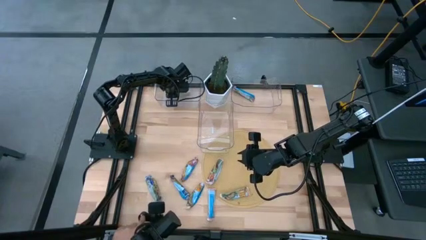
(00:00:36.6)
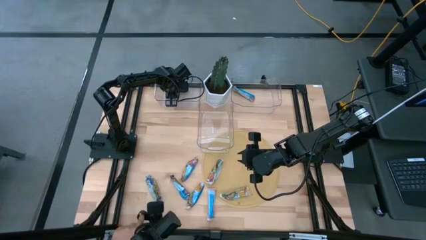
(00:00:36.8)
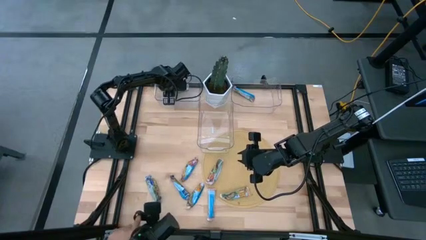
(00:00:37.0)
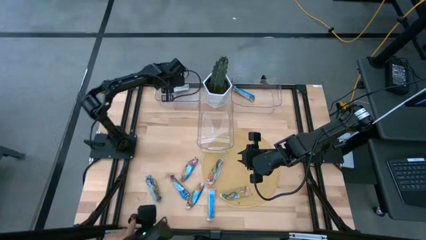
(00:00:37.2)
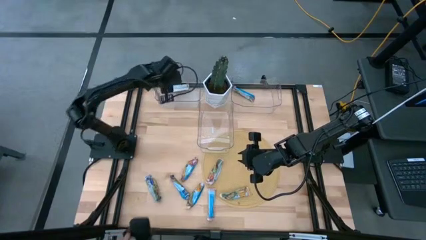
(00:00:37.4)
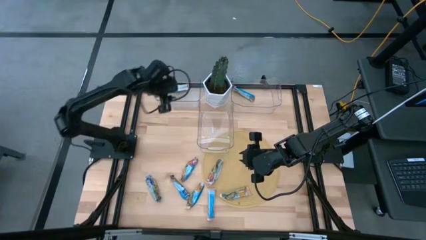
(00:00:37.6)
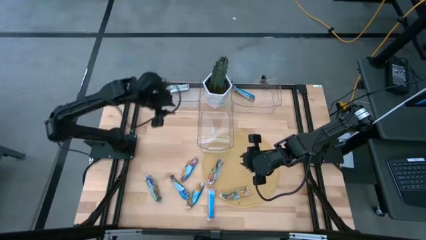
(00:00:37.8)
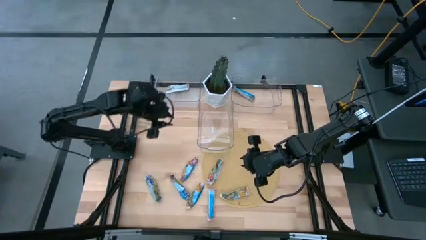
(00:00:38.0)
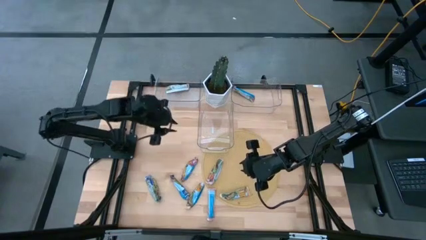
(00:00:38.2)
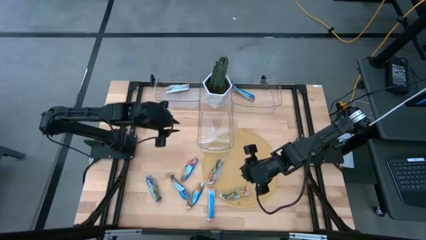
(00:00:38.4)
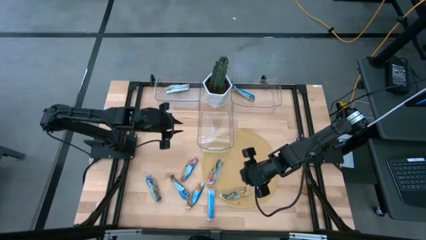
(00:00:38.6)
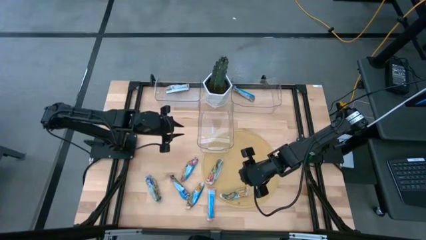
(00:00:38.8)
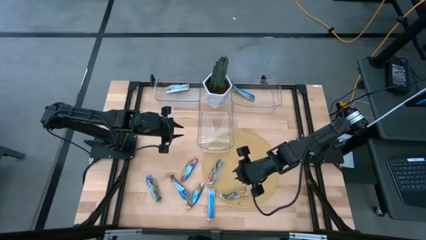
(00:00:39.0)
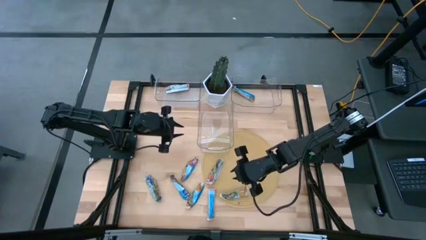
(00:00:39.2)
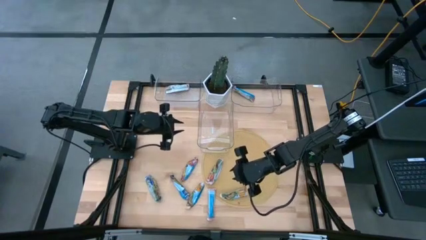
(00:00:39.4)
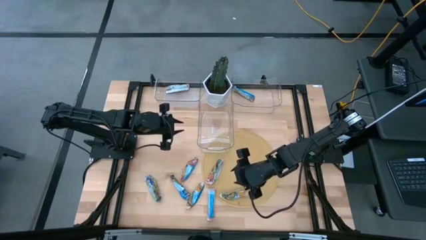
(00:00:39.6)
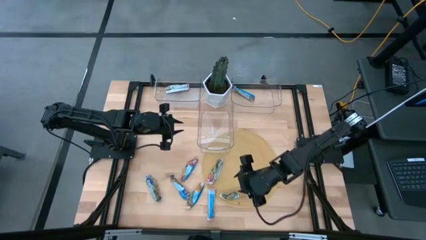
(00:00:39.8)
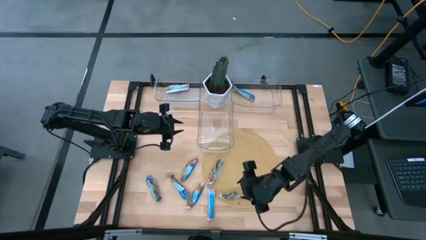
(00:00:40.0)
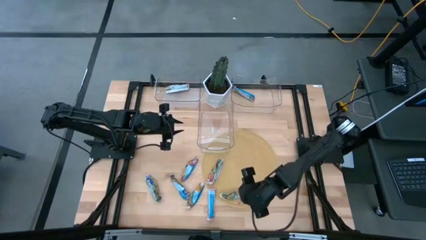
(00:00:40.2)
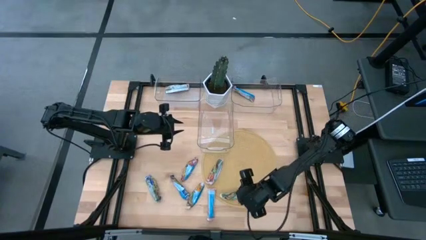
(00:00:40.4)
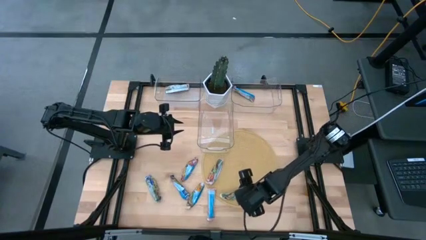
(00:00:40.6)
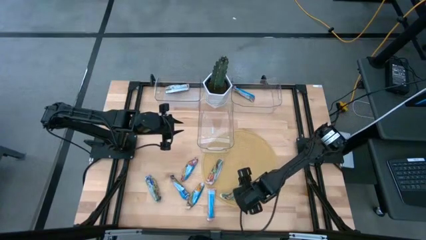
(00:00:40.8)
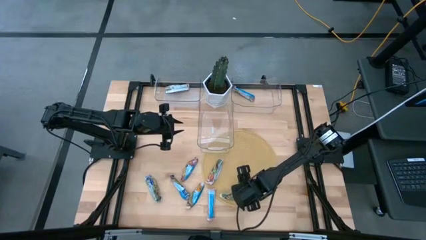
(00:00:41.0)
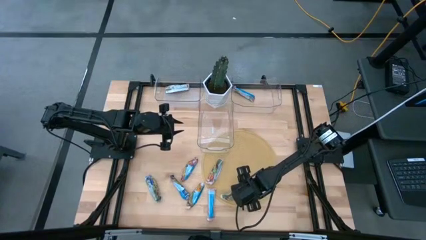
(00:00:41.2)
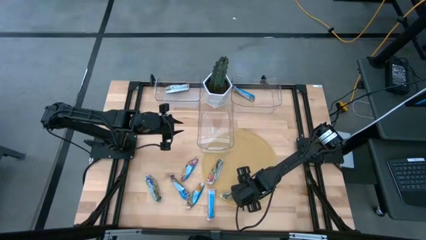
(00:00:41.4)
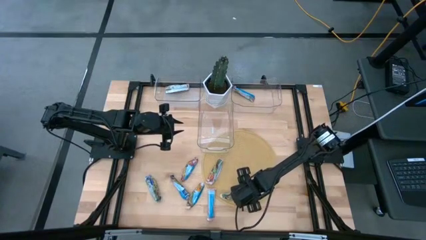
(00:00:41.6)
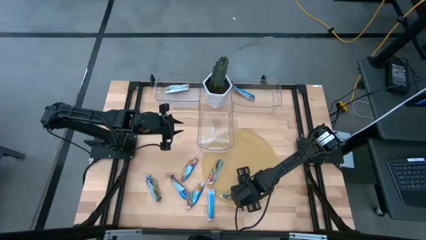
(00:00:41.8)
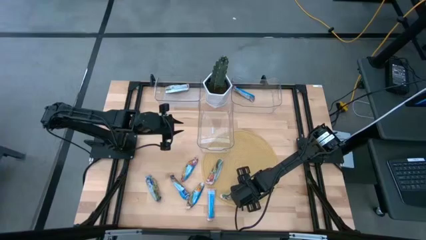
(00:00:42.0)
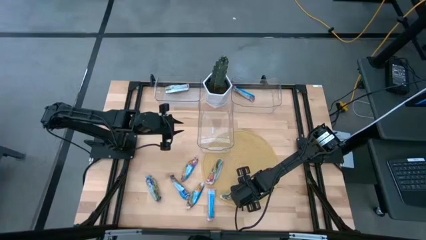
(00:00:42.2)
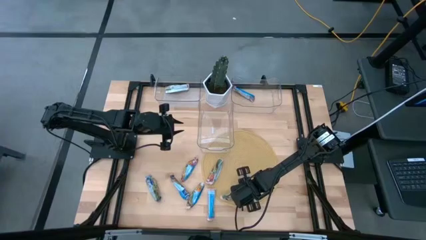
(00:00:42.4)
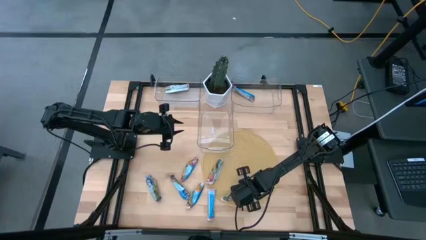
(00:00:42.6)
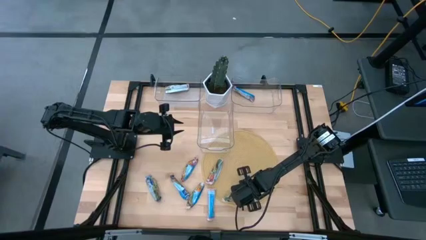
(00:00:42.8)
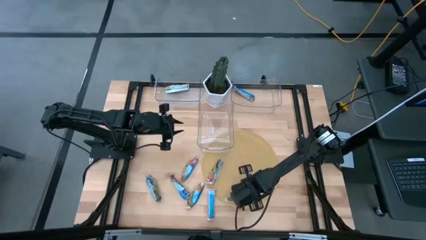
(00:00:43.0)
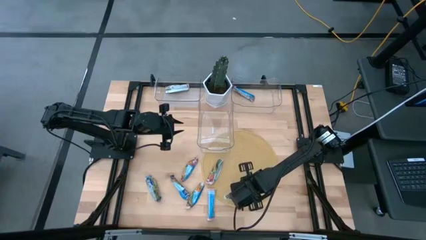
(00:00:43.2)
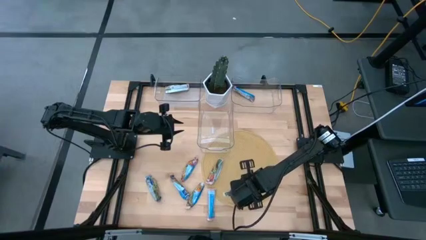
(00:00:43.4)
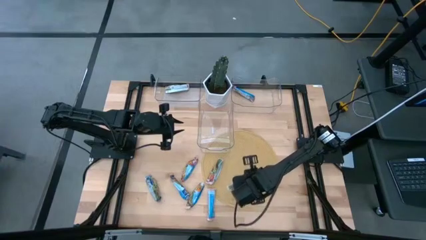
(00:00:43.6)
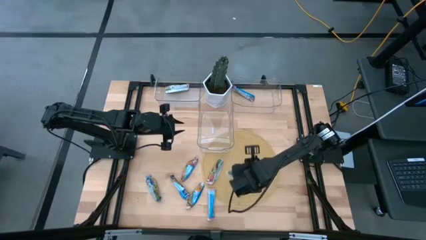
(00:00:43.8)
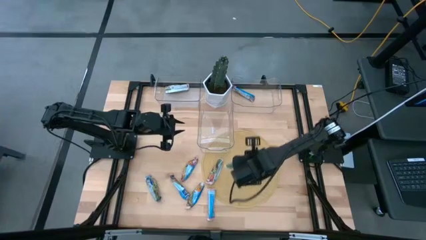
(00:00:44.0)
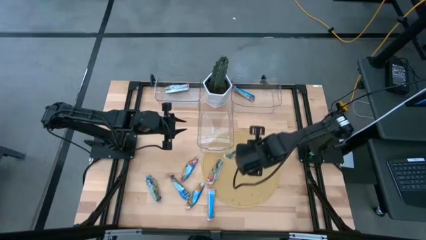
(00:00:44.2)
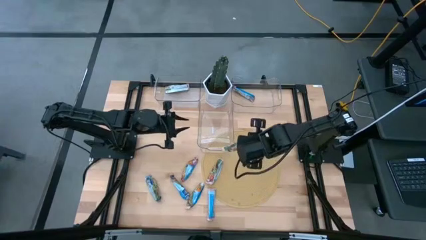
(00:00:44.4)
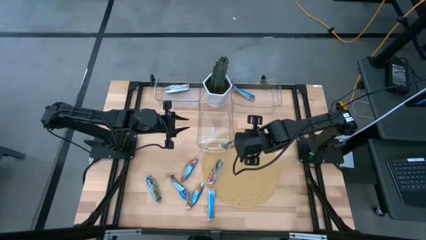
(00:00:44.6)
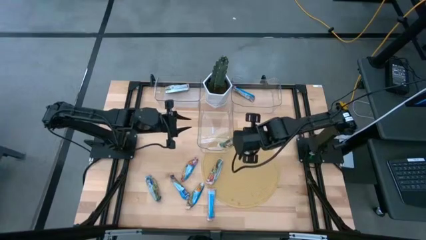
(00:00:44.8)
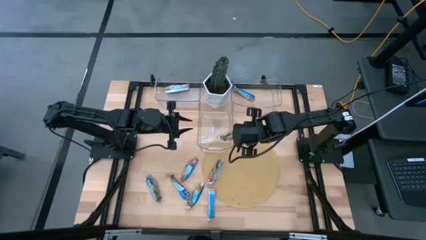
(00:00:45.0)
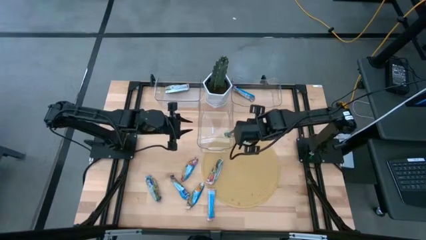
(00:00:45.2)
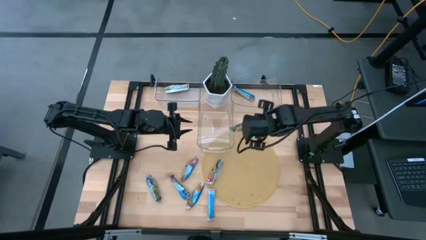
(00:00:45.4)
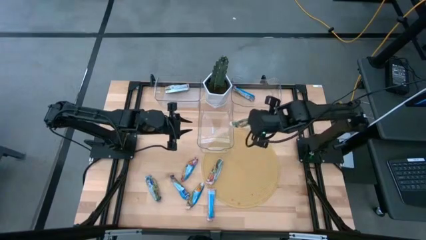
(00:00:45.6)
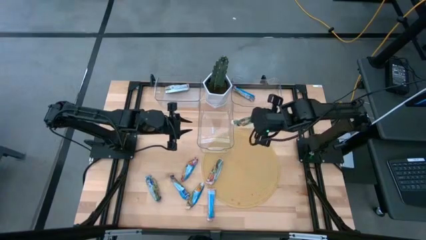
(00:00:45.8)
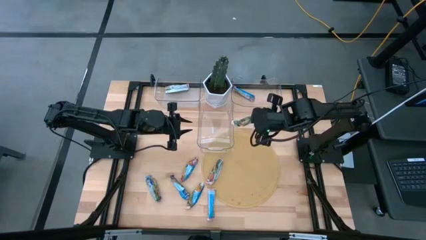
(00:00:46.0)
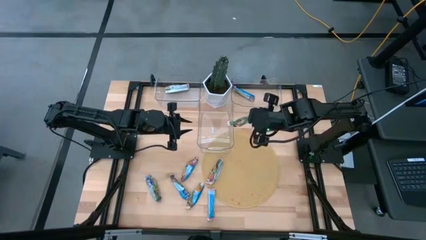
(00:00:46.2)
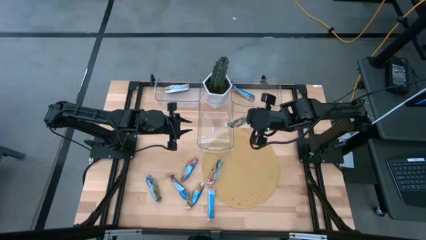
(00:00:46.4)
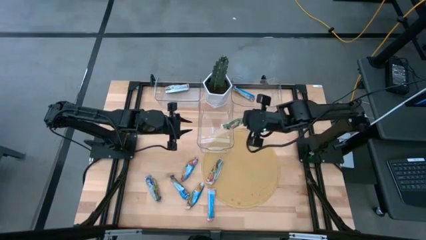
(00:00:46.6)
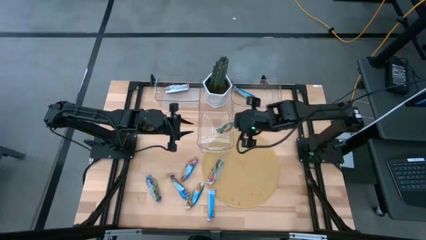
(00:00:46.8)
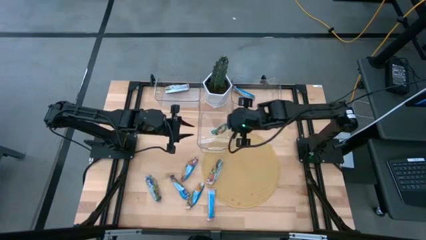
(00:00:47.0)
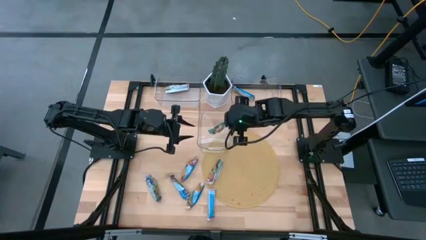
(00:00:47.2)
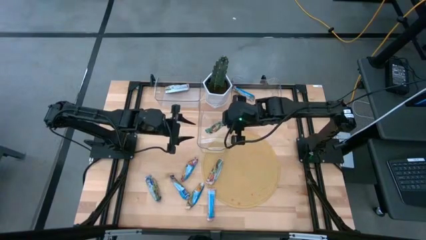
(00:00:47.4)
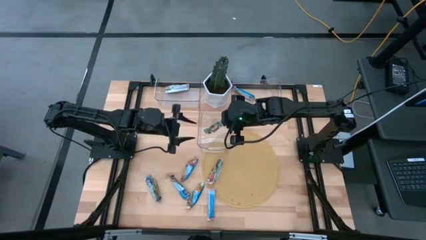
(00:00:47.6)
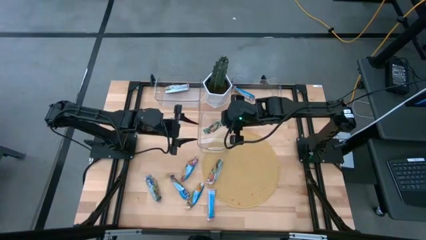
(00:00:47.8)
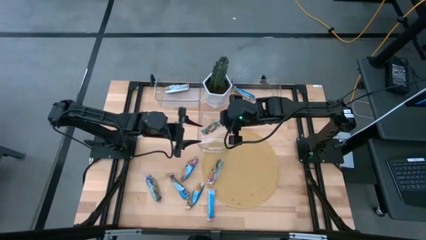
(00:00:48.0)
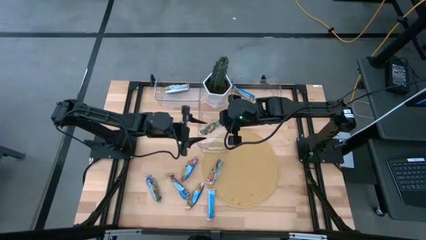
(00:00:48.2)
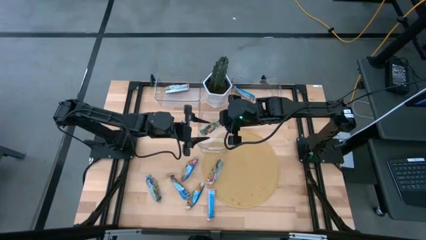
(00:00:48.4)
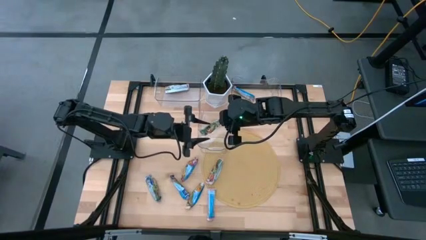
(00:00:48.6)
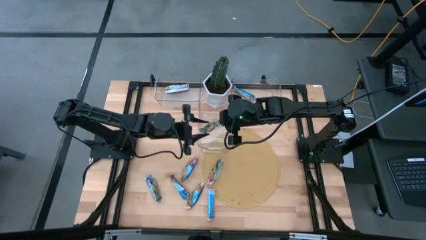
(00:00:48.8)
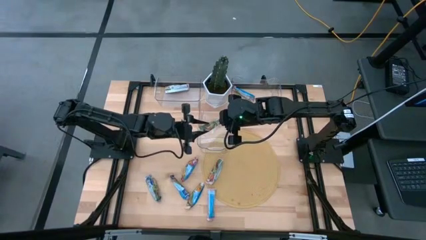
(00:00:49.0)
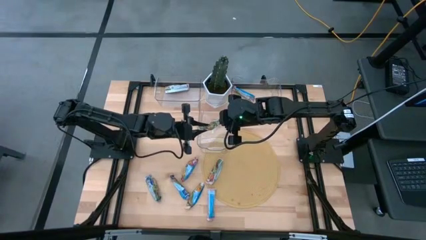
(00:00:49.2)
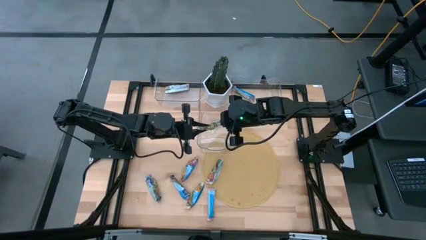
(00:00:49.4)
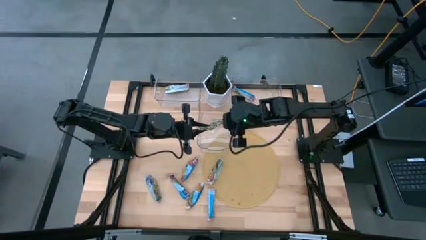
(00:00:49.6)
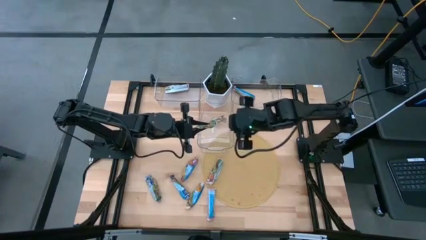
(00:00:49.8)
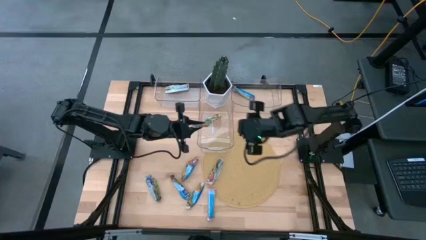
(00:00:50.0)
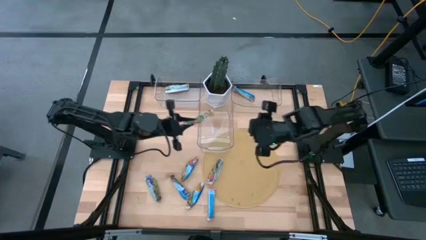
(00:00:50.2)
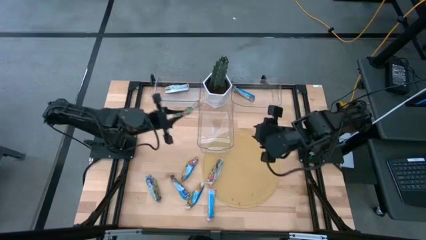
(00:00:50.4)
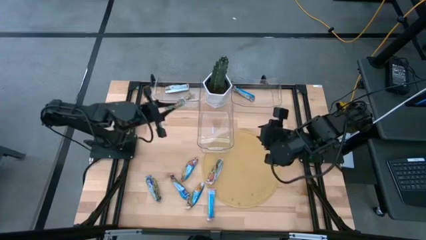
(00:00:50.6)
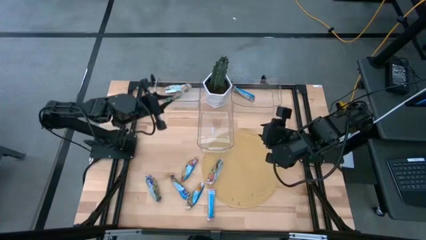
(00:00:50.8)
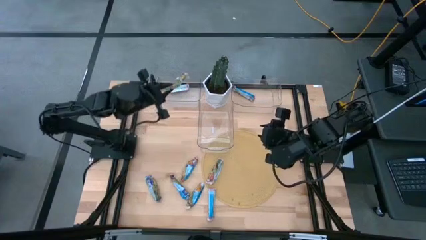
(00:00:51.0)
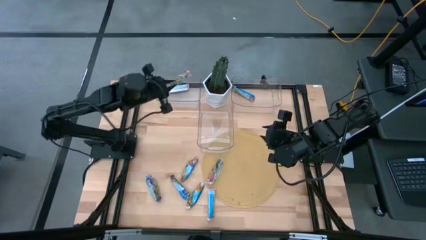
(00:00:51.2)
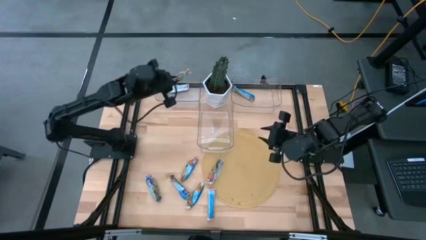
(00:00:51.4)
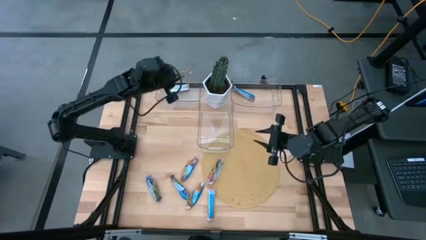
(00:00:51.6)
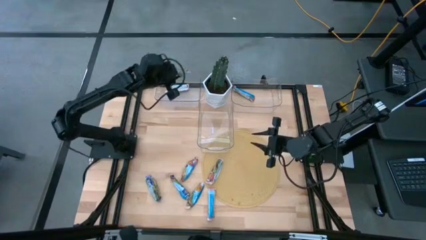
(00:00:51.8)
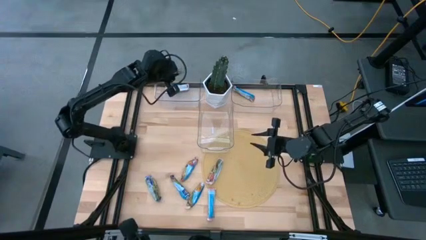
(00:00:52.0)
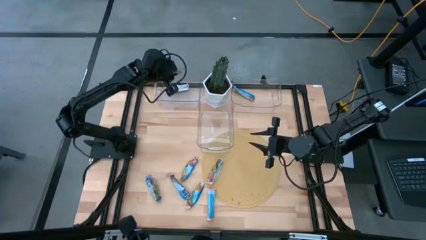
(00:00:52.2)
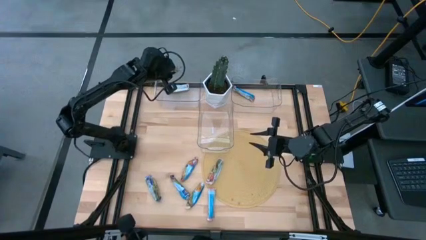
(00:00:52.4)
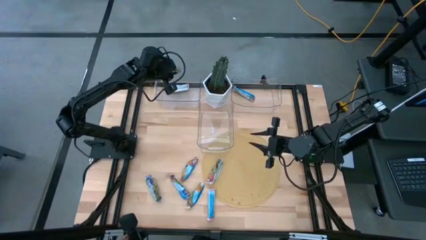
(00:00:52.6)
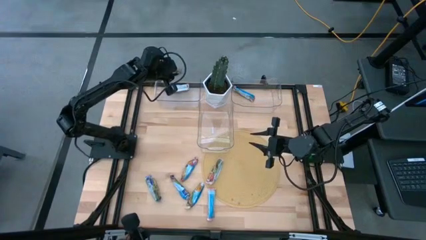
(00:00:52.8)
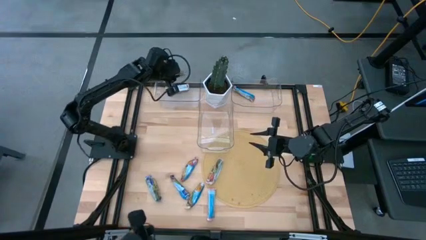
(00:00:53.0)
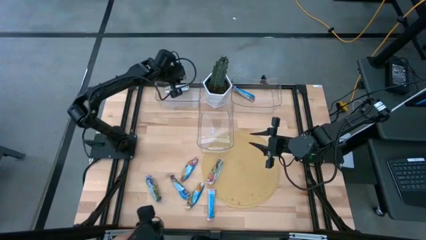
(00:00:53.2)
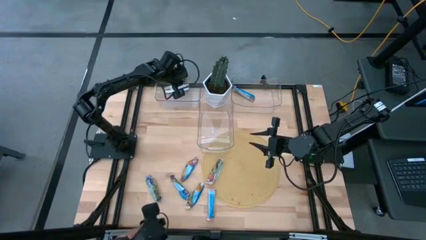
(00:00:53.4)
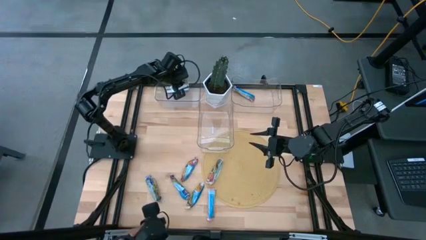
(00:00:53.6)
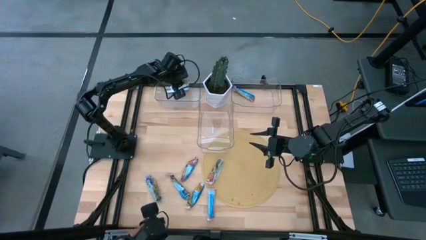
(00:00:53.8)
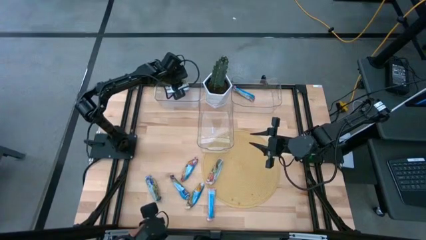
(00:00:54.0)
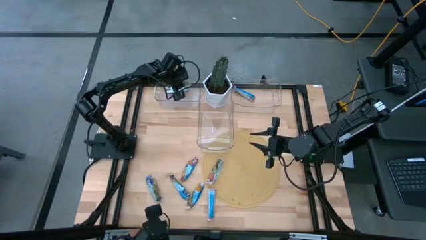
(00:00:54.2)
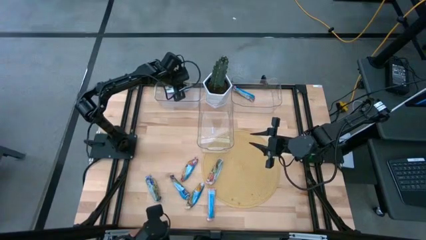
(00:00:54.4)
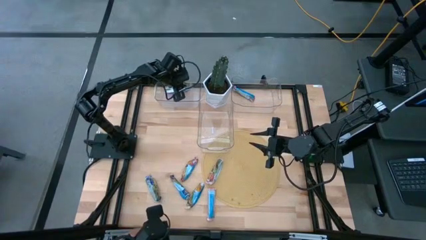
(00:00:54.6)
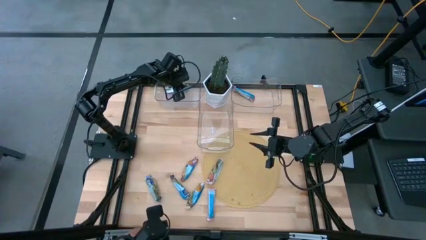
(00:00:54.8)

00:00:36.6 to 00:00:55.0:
Task: Pick and place Granola Bars by type
Put the yellow green granola bar into the left transparent bin
